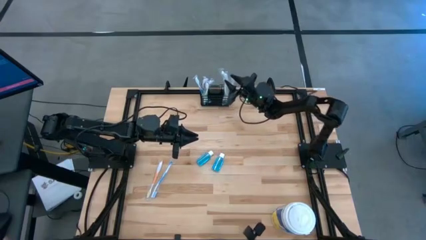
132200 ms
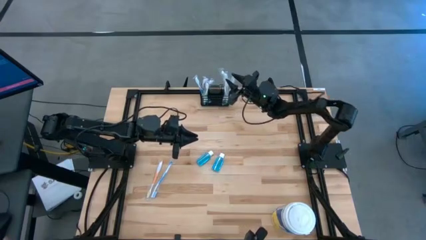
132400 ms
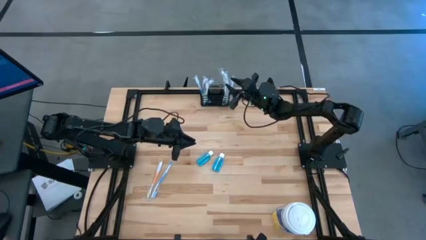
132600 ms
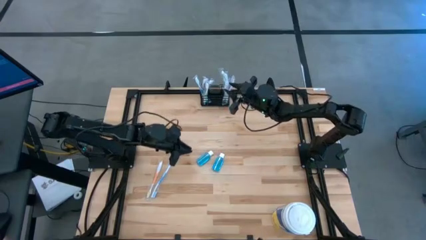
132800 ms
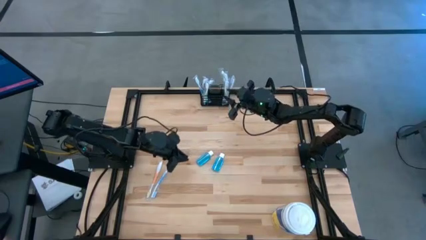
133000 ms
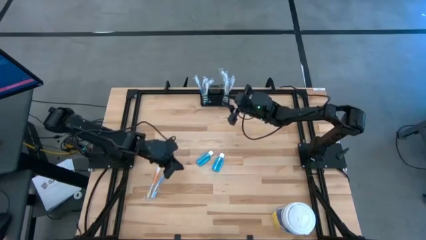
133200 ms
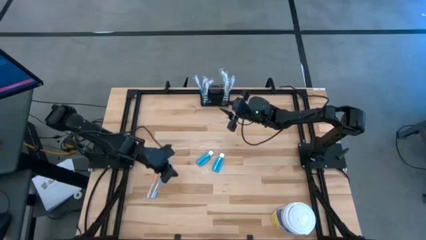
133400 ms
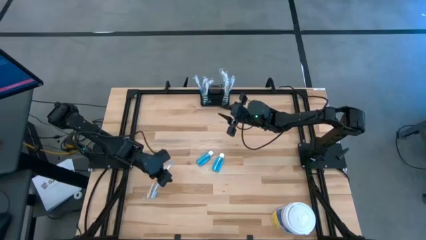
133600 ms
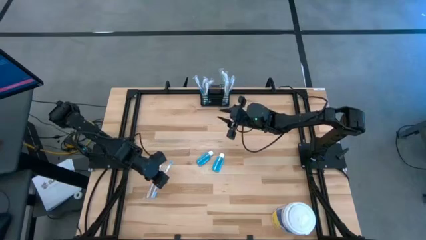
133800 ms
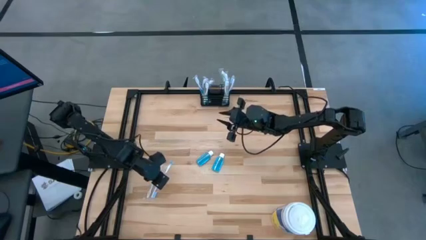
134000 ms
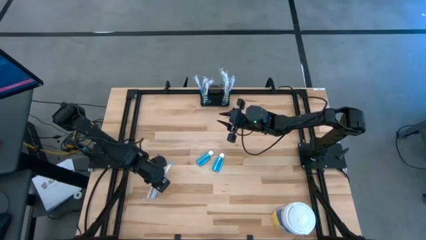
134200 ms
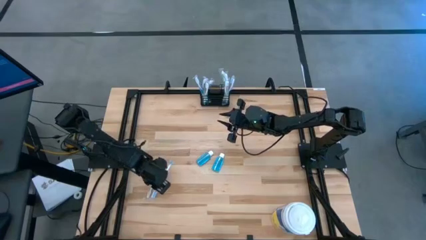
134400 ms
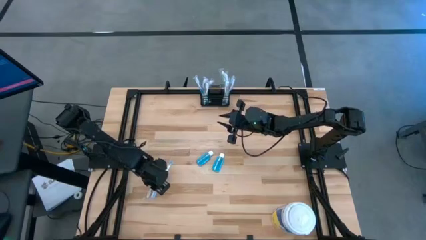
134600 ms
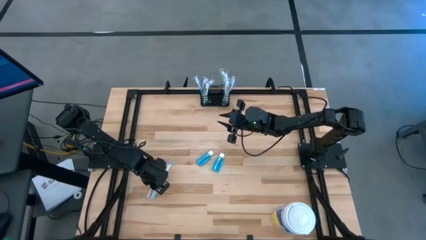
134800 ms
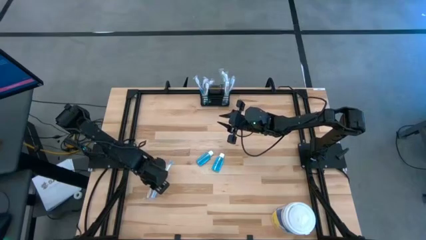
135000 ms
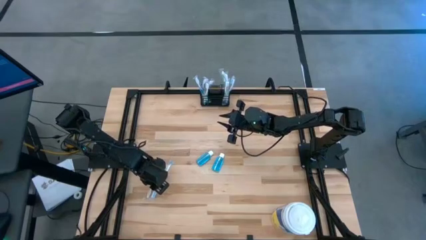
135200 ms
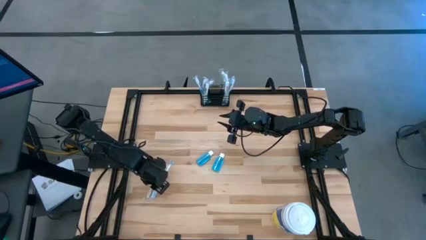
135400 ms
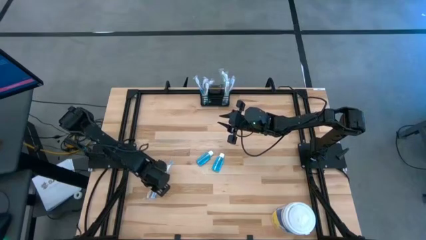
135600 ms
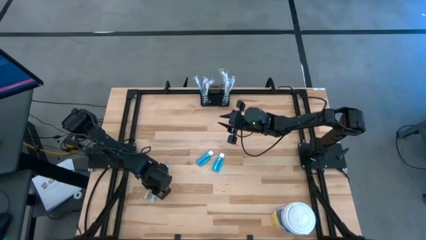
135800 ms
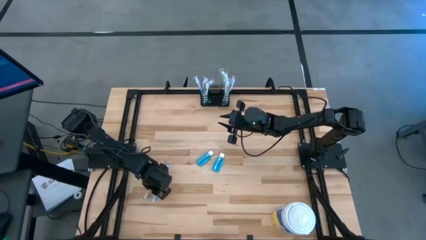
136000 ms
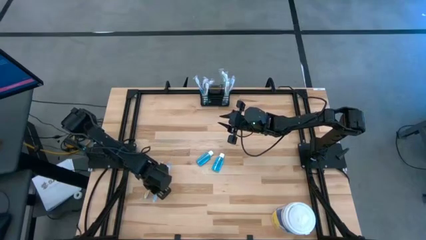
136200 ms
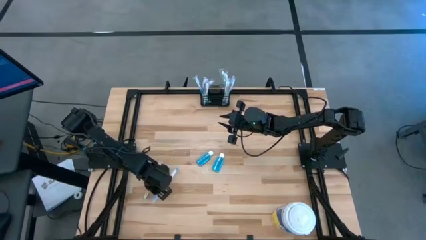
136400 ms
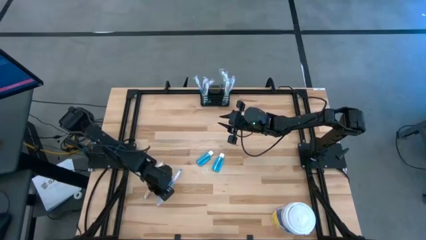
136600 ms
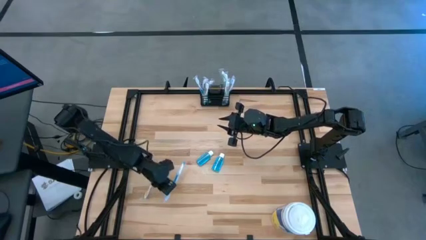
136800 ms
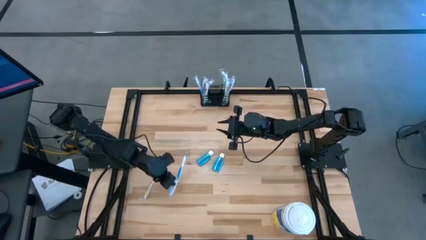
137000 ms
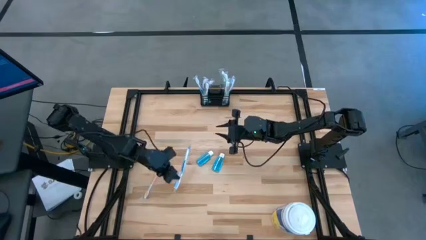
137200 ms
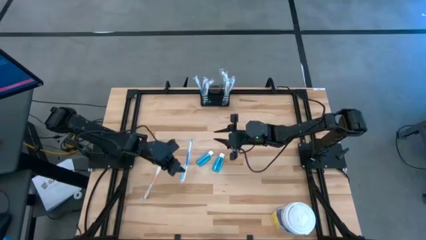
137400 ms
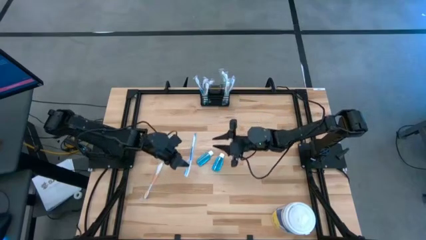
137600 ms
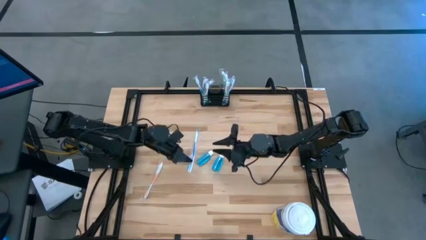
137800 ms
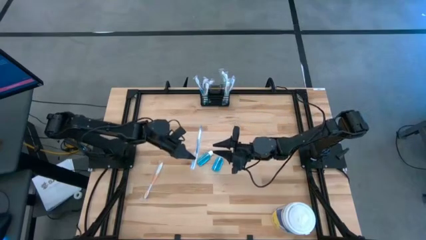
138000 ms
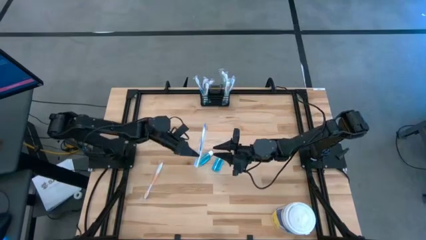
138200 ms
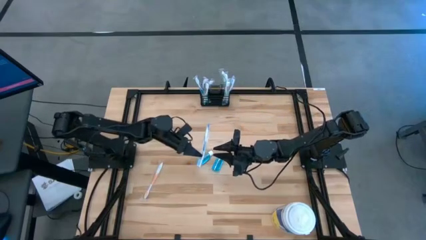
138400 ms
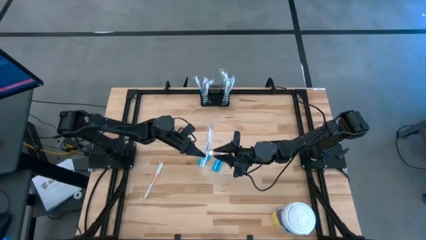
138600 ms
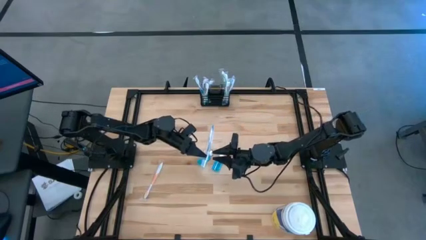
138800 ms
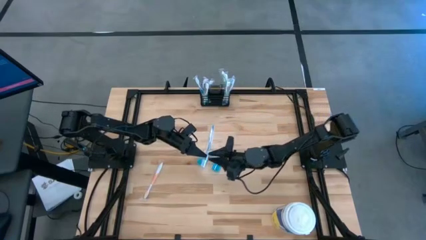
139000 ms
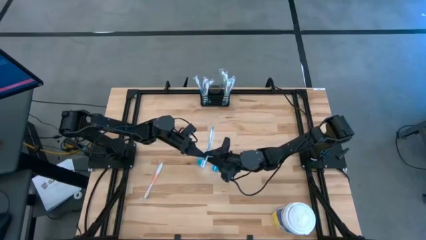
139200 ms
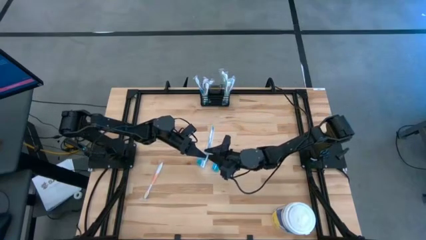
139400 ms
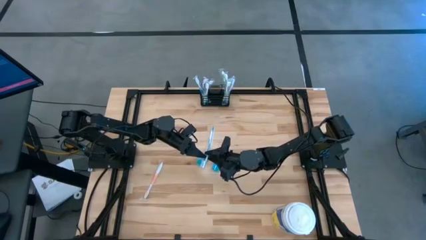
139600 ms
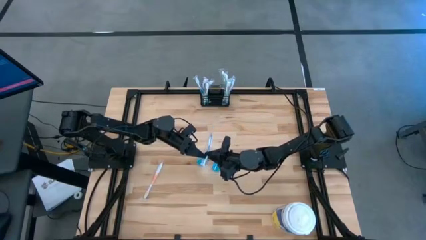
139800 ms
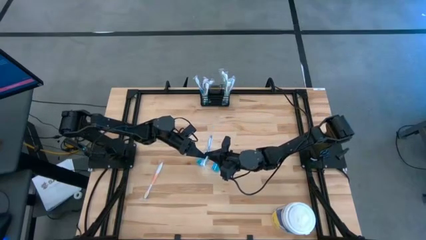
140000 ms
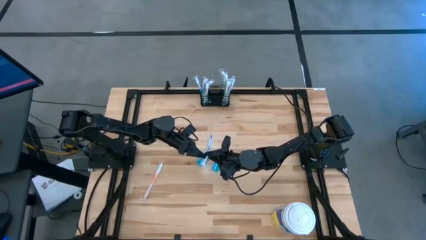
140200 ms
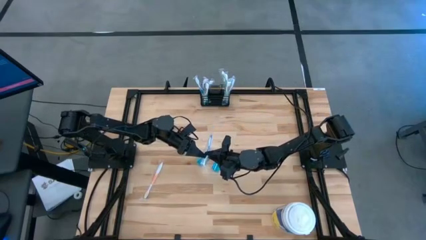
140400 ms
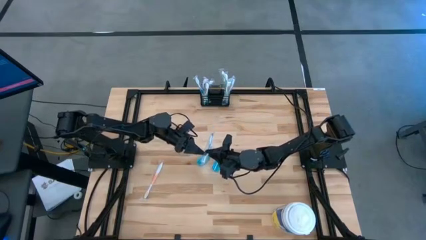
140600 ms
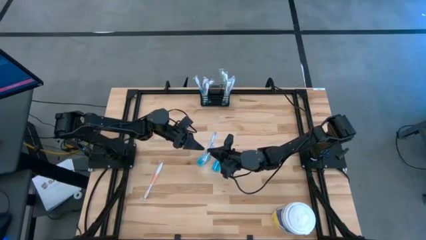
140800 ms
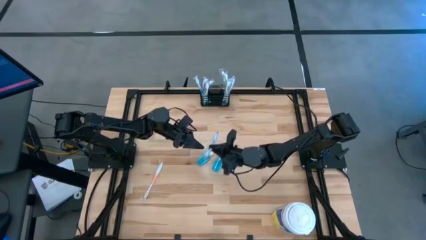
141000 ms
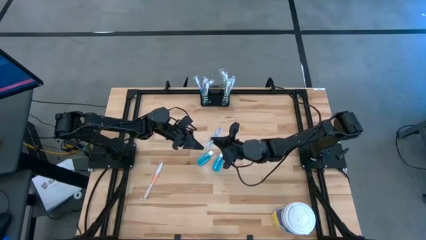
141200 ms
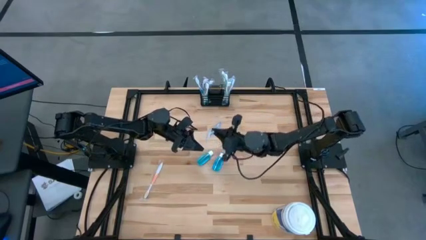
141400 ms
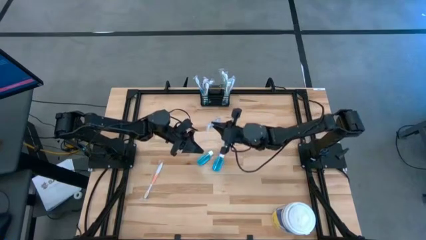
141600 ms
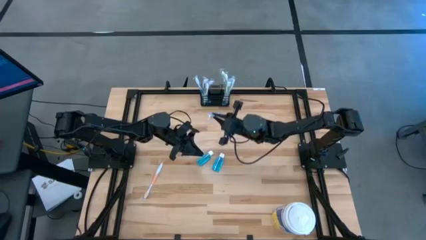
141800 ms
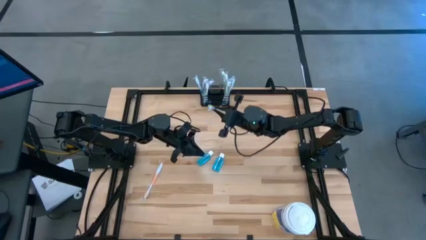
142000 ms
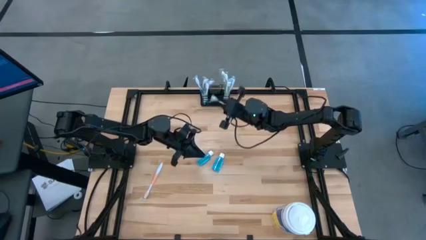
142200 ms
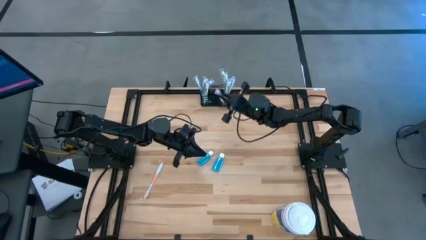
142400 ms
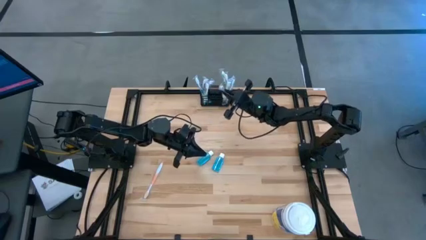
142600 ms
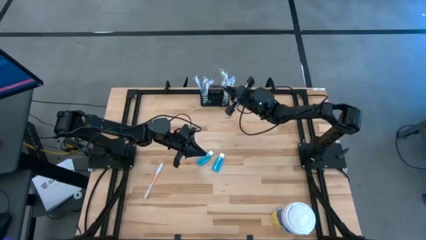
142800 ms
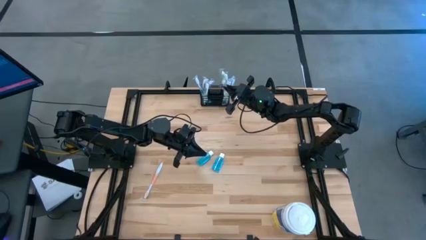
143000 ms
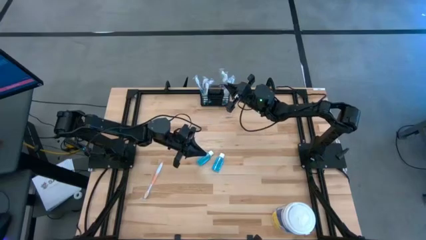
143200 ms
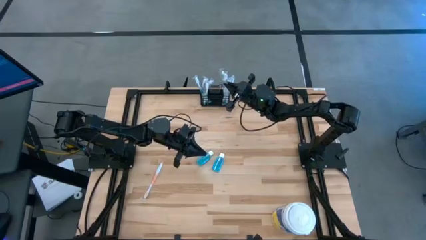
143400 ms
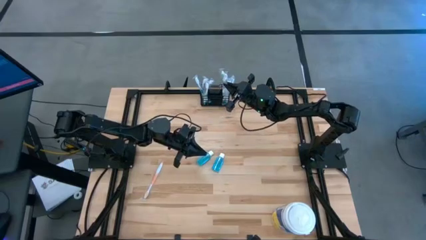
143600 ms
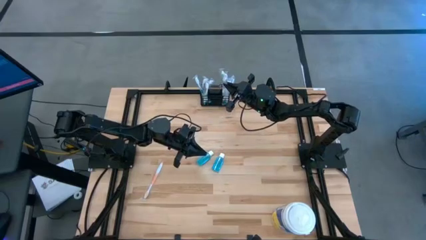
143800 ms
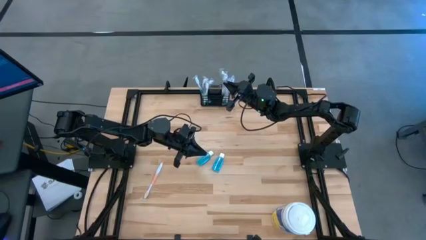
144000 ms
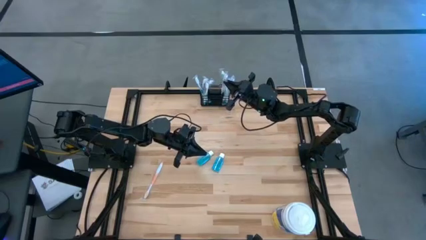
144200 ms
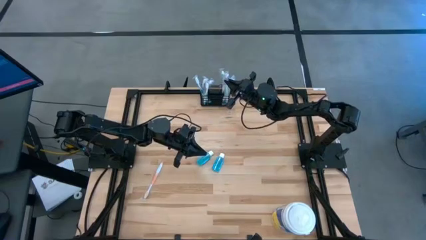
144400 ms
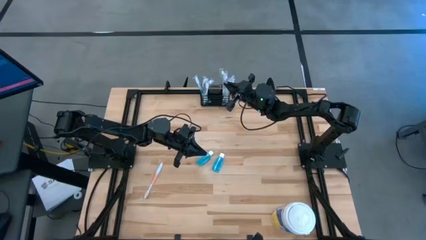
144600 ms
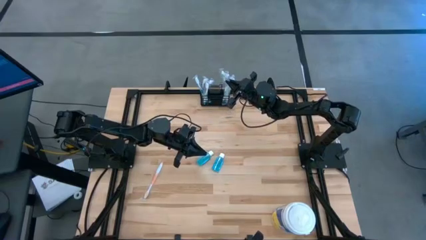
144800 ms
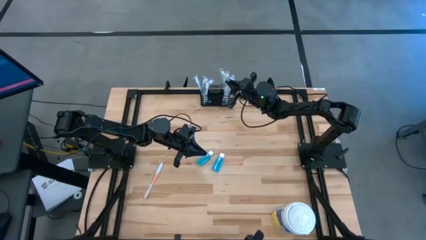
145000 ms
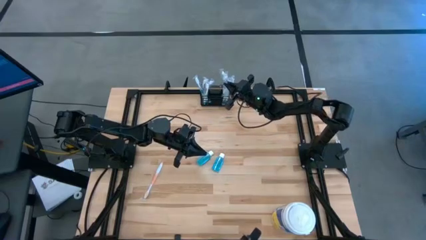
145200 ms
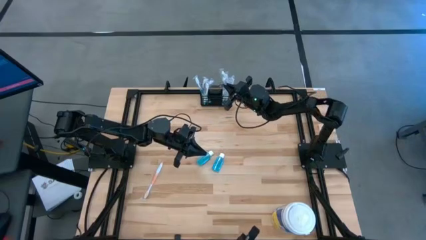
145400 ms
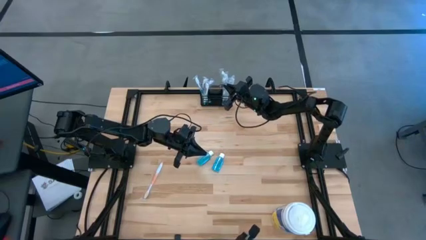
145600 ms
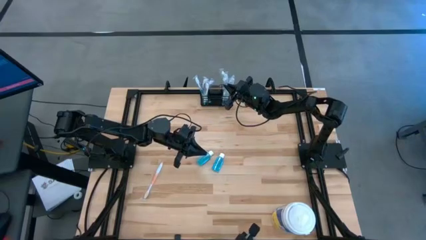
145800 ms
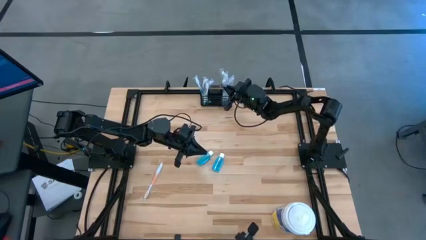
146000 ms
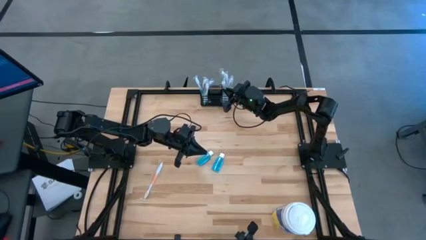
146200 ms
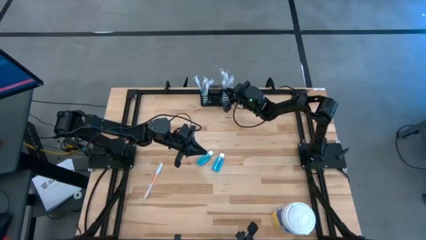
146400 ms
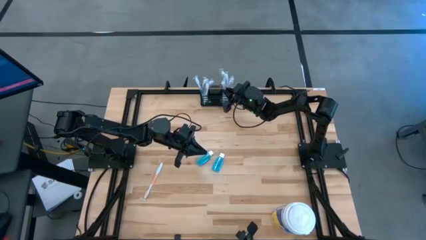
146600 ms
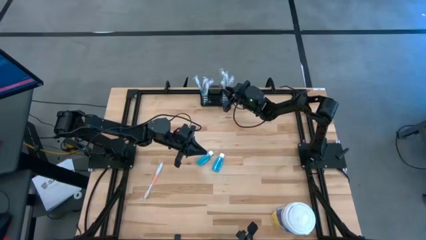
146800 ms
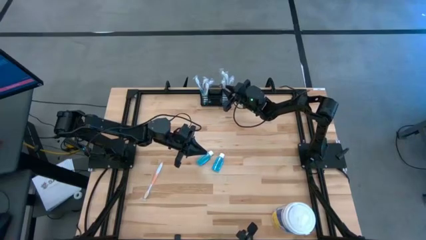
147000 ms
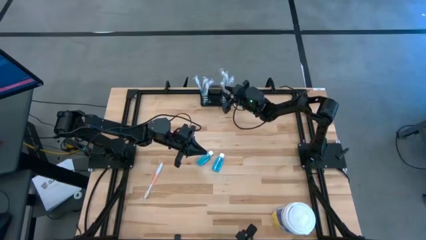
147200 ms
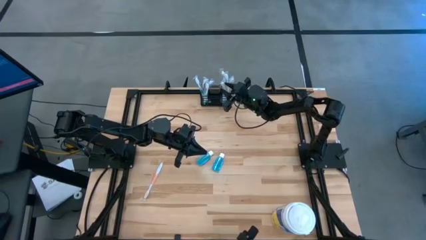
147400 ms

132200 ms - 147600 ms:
Task: Pick & Place toothbrushing station
Put the blue toothbrush into the black wire organizer

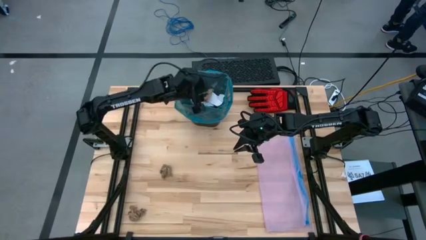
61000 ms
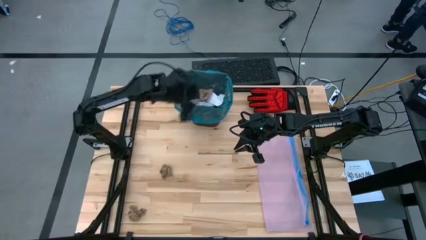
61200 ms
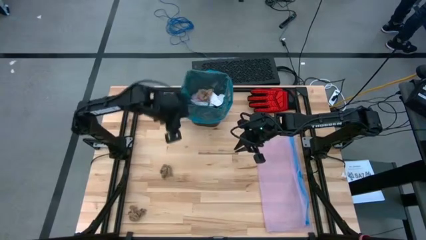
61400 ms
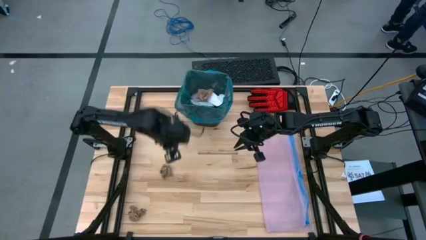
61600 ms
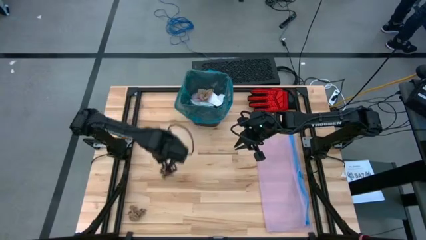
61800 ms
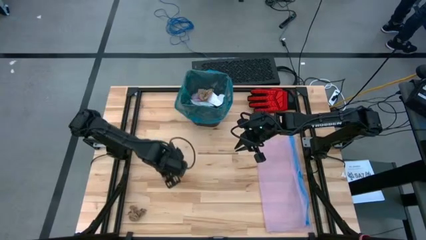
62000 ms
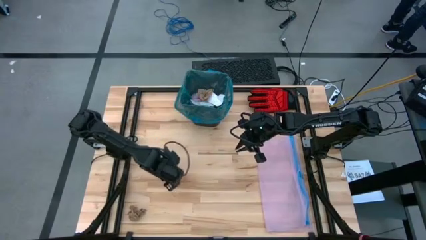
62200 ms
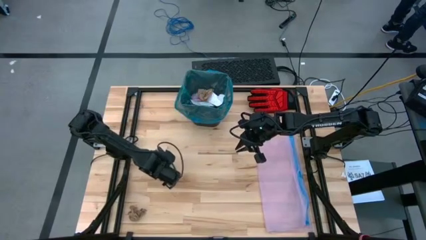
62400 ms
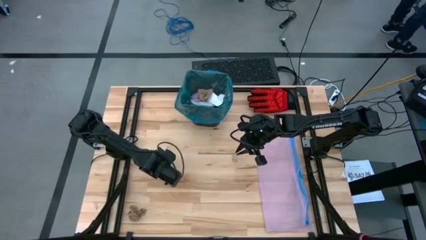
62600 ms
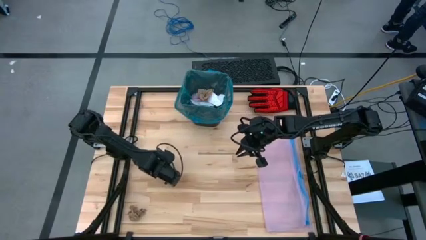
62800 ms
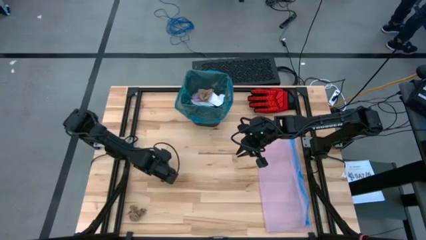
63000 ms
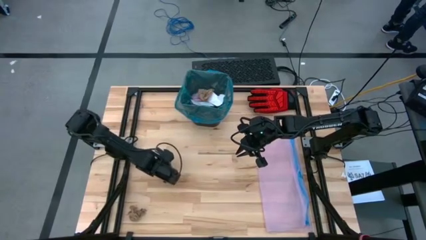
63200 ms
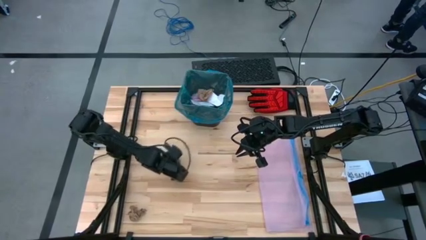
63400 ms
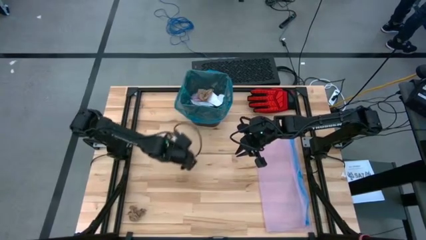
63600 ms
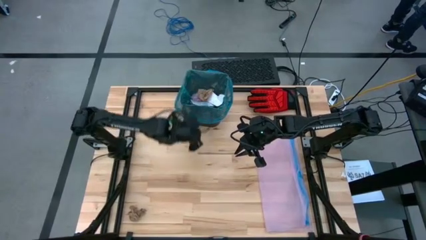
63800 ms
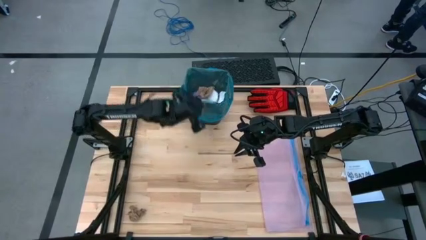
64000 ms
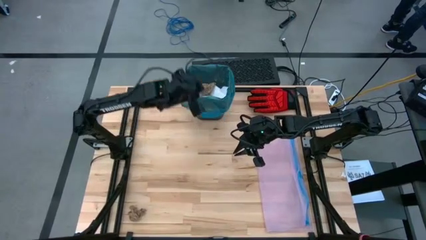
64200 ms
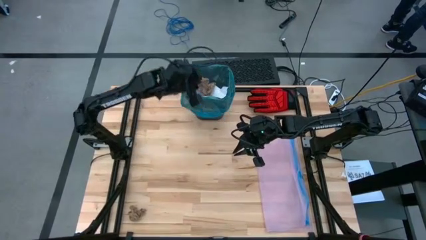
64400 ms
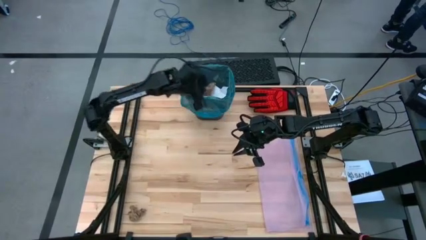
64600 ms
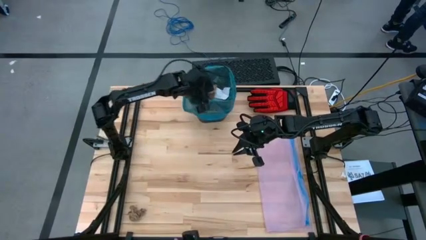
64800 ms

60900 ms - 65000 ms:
Task: place trash/remove bag and relplace
Put the brown napkin into the trash bin
